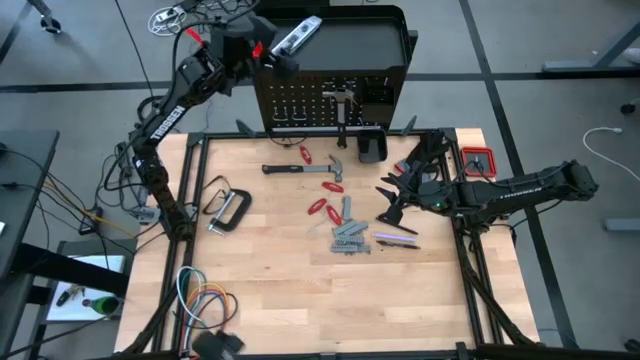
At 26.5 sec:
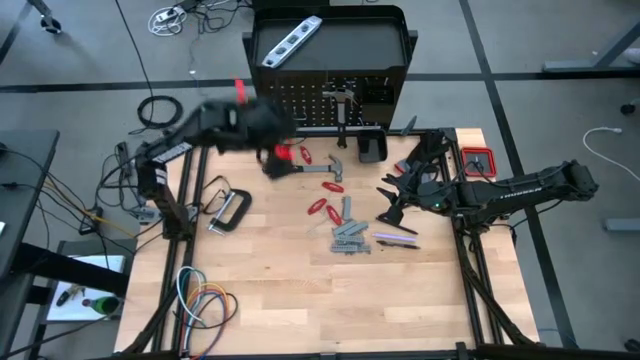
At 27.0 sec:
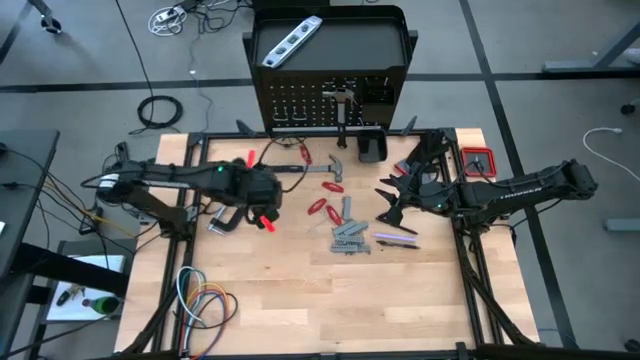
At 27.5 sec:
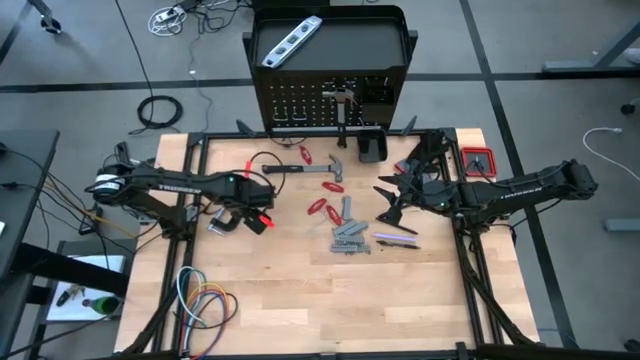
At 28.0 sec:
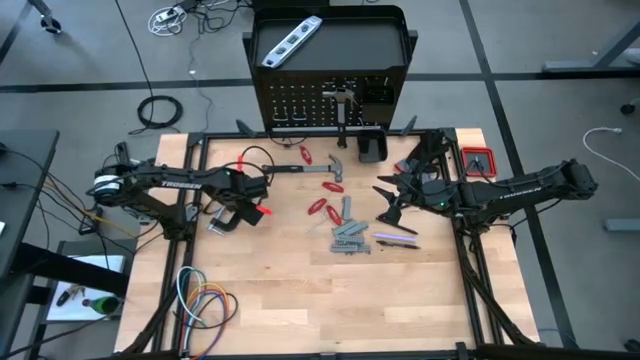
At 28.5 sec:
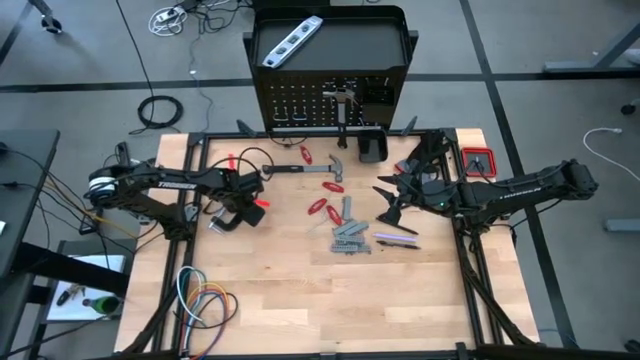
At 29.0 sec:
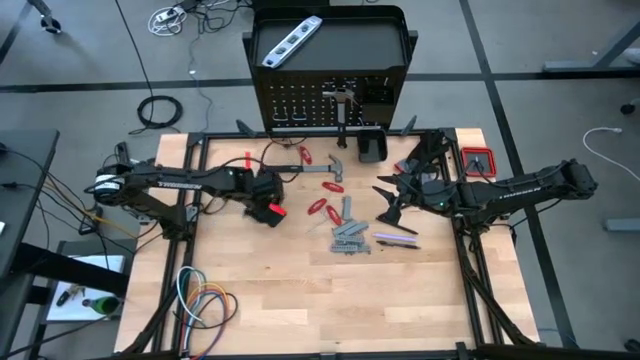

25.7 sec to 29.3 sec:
Task: Hang tools onto peg board
Put the clamp on top of the peg board

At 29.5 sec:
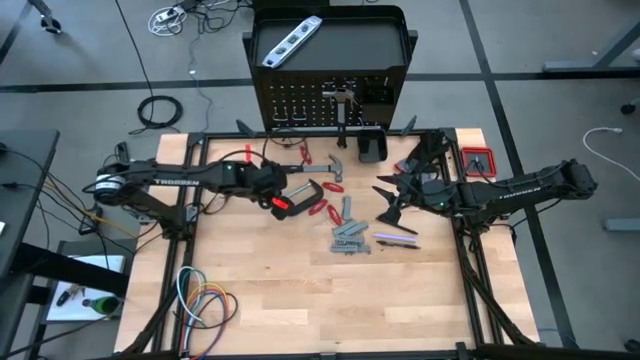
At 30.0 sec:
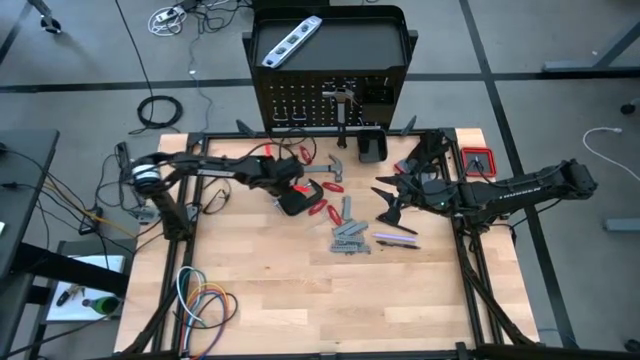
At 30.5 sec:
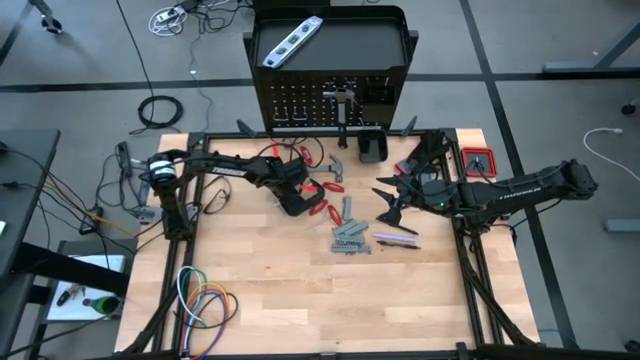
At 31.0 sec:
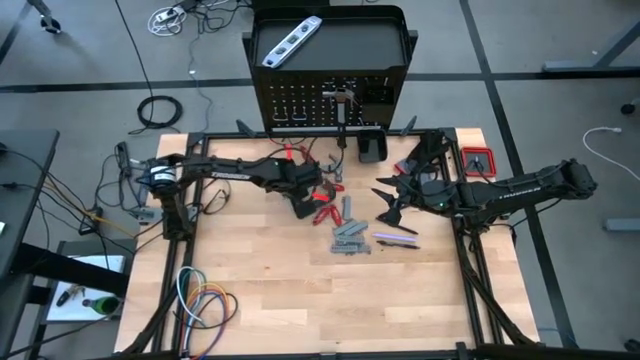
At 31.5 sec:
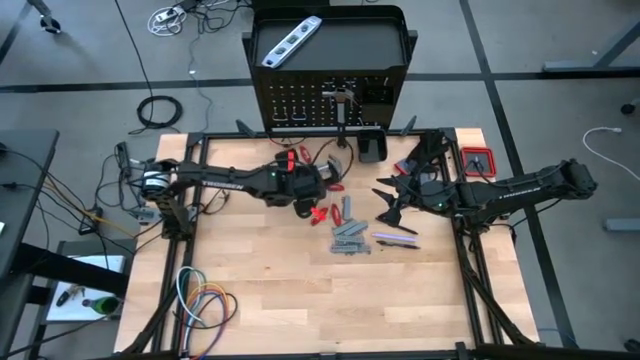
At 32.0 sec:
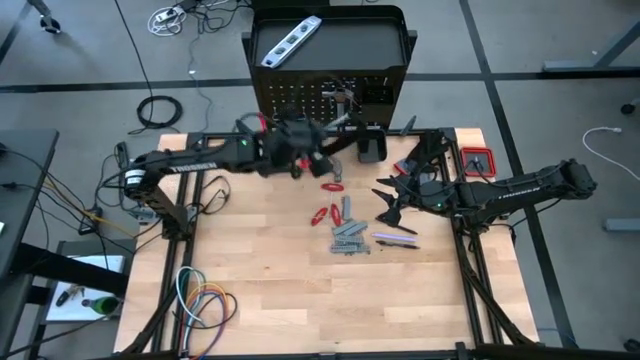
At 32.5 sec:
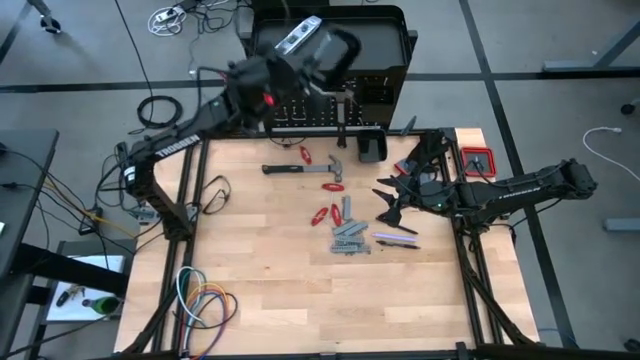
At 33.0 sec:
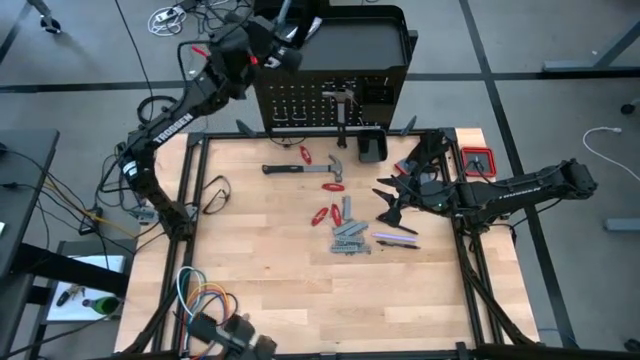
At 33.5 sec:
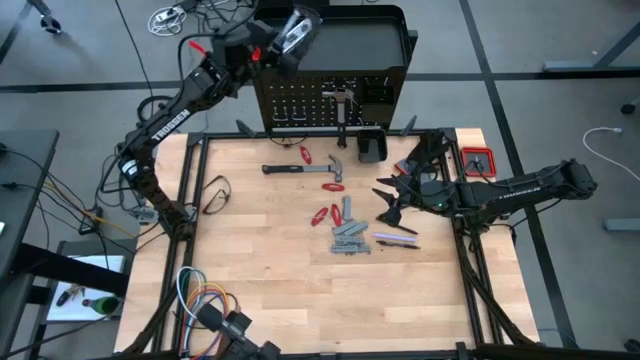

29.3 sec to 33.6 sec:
Put the clamp on top of the peg board

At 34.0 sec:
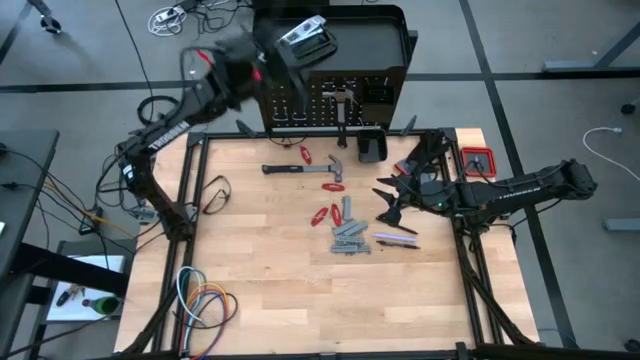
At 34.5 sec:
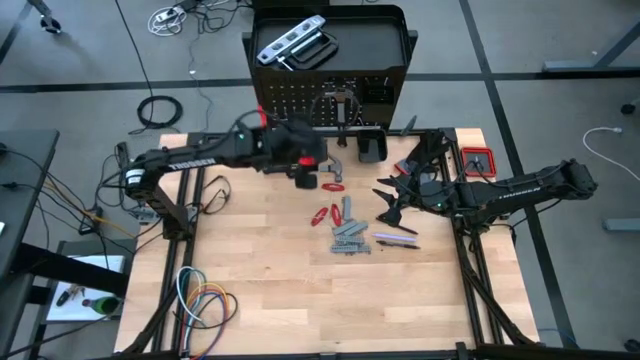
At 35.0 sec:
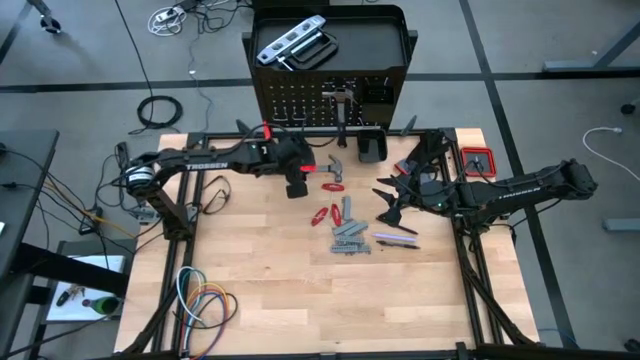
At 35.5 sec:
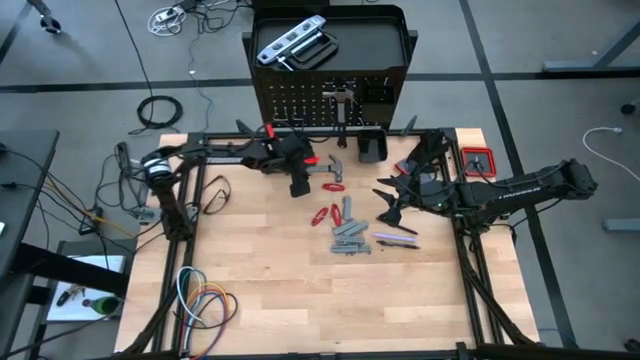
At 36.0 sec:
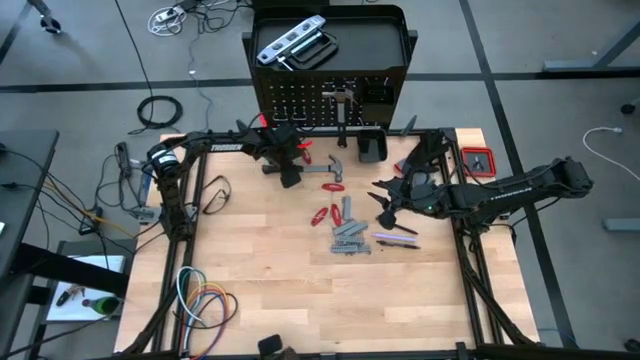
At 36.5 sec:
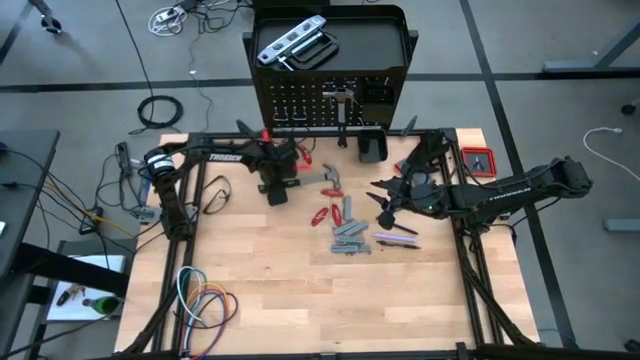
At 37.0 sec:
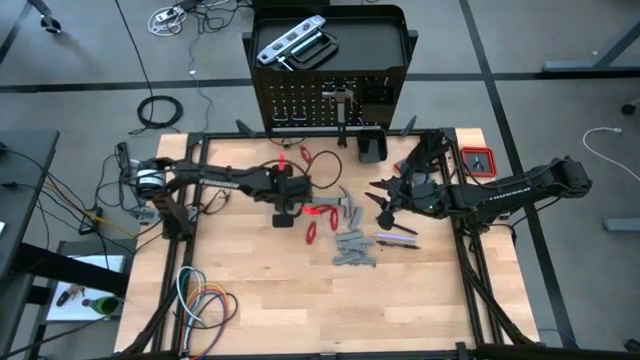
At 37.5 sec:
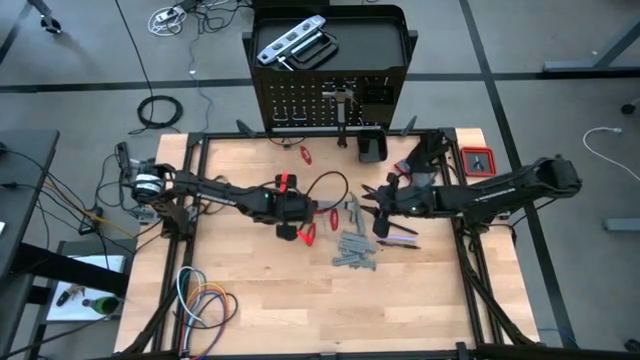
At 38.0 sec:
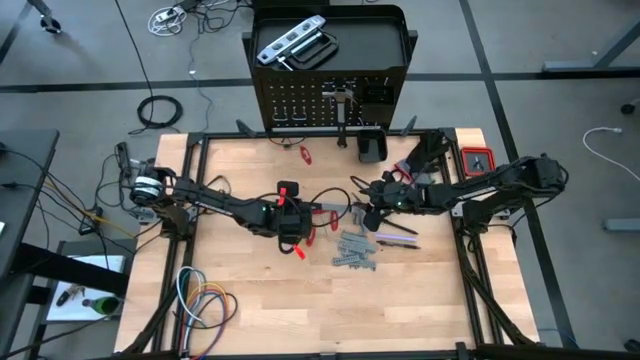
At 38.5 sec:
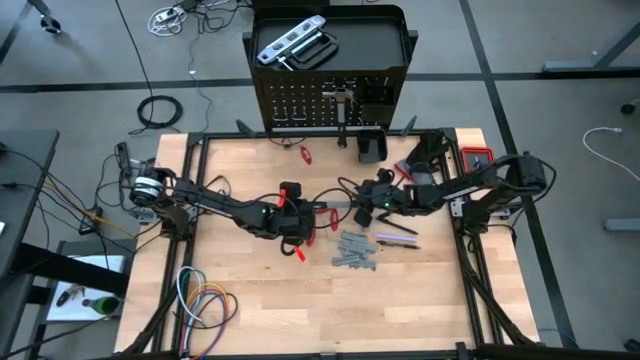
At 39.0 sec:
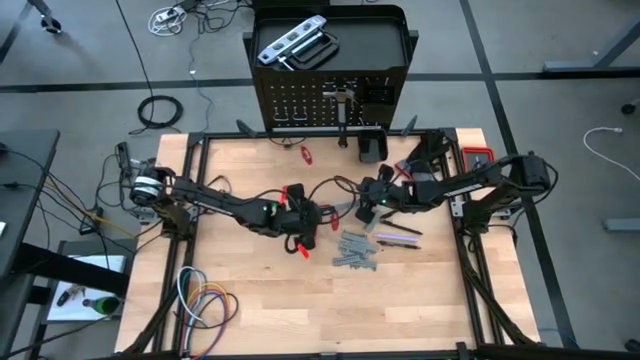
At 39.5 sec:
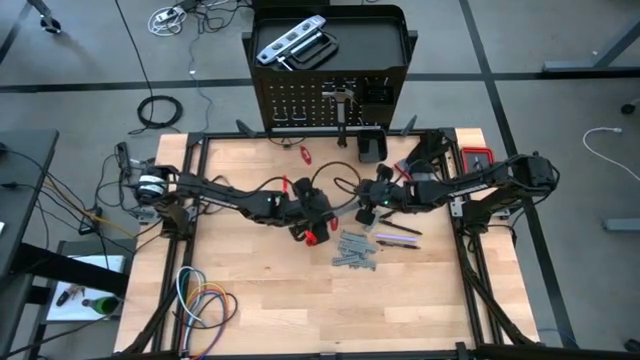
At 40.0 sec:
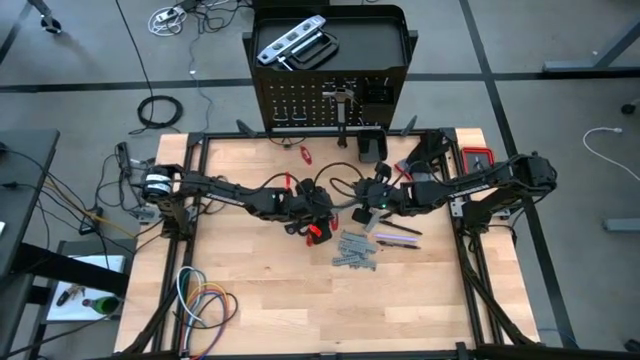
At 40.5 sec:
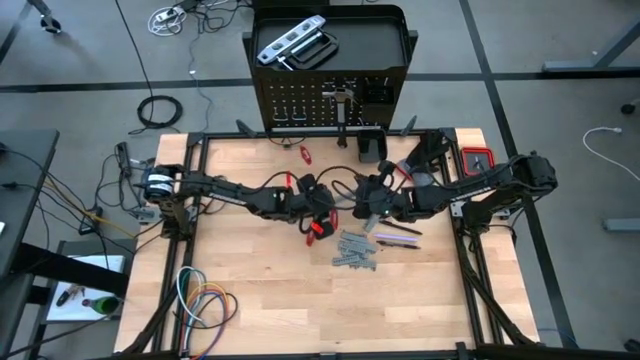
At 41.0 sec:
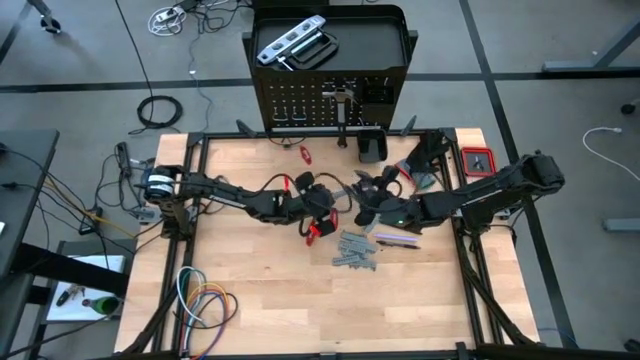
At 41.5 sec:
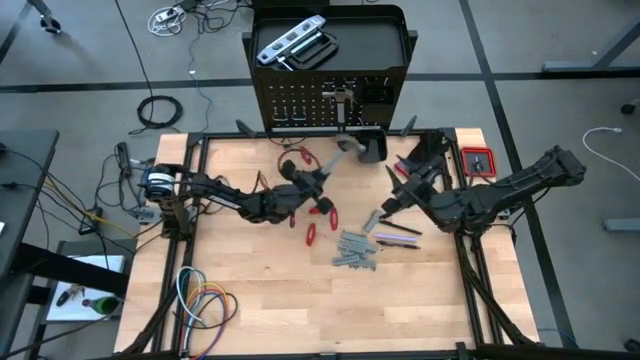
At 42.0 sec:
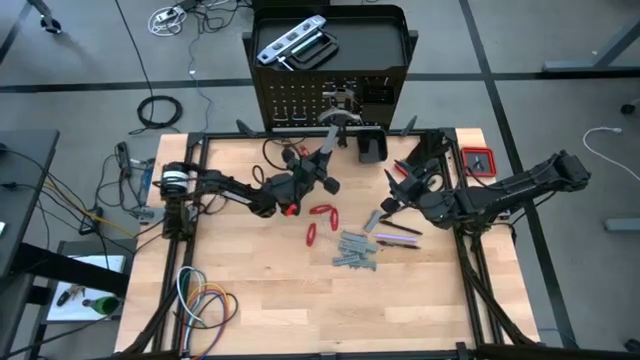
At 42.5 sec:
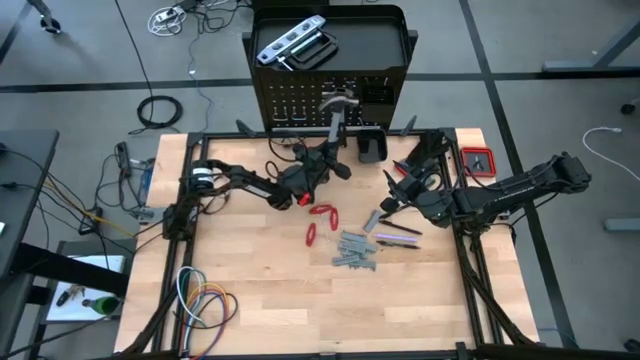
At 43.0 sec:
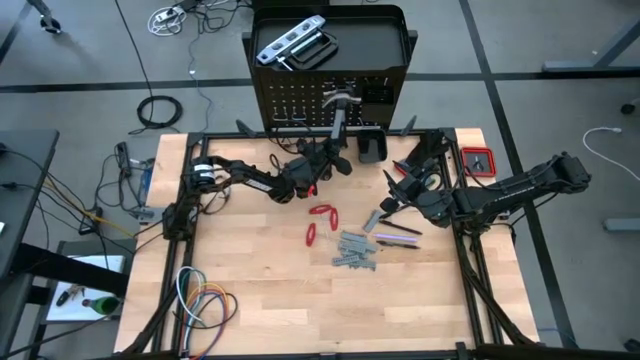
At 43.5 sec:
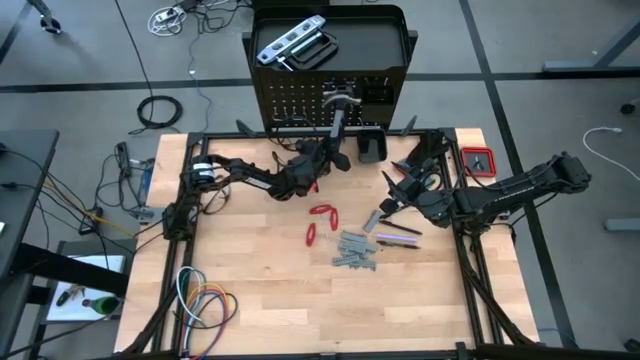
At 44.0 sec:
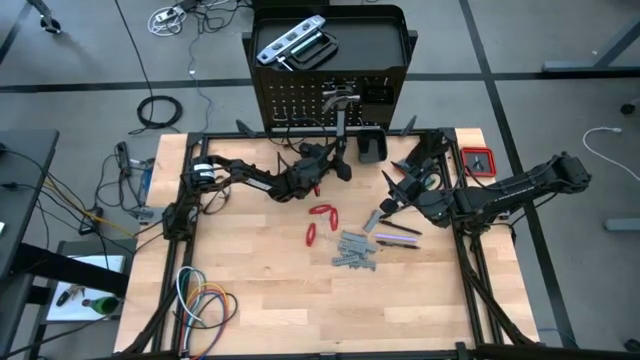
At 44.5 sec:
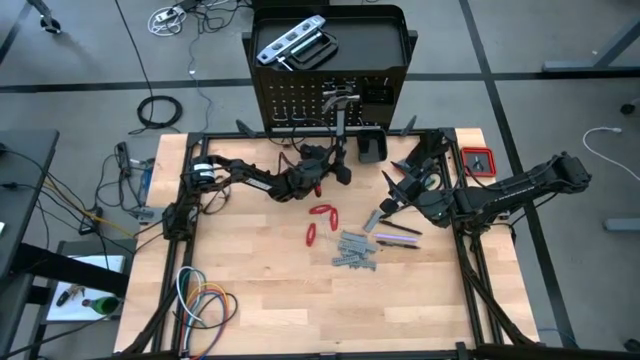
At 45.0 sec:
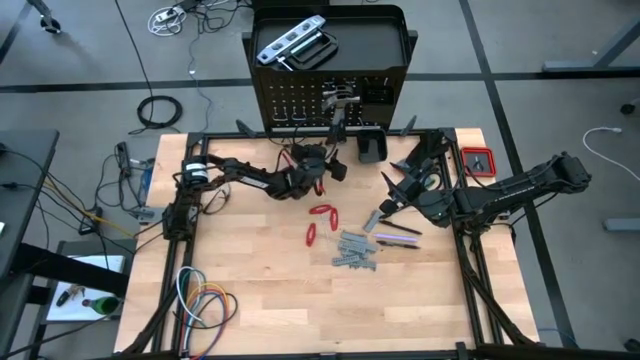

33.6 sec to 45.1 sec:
Hang the hammer onto the peg board

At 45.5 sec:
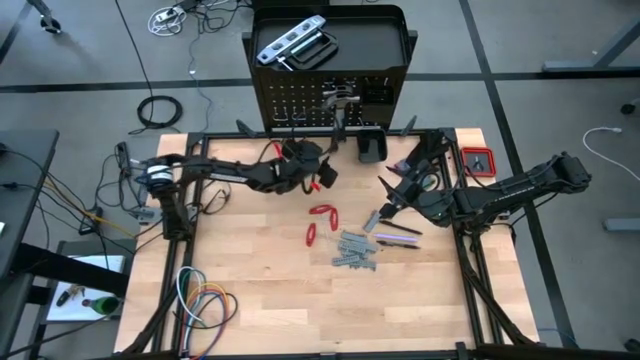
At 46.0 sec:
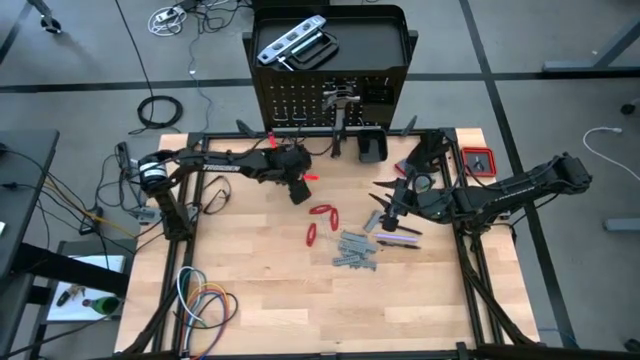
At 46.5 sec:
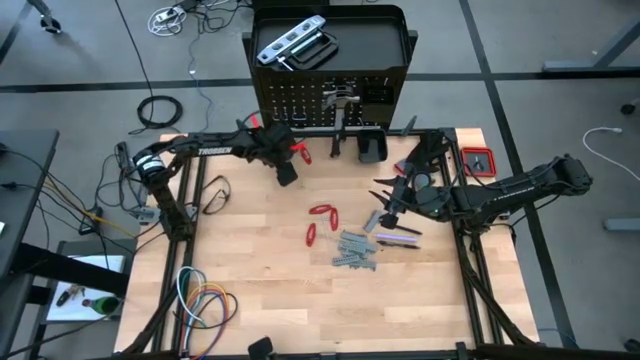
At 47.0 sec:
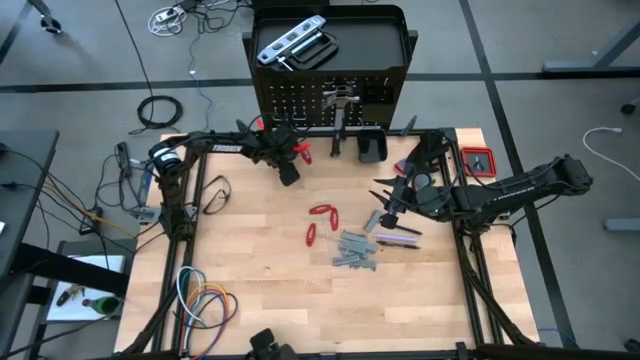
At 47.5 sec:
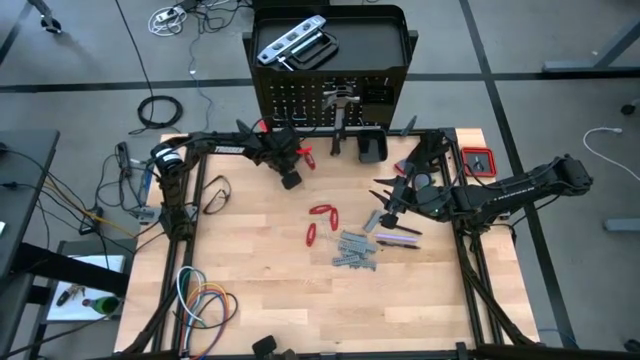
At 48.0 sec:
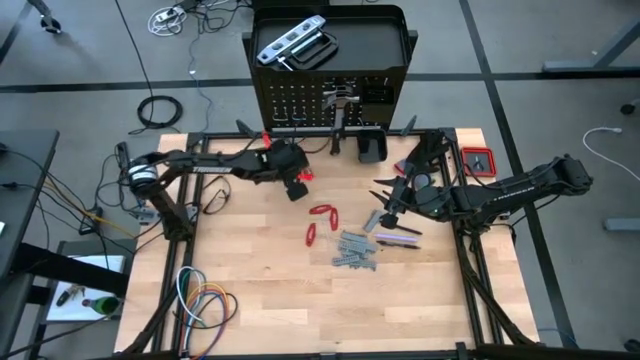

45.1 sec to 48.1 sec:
Hang the allen wrench onto the peg board
